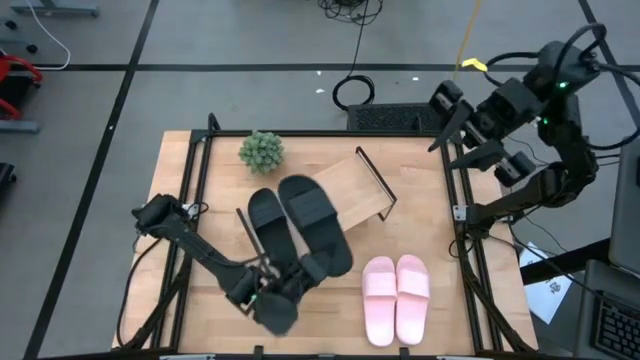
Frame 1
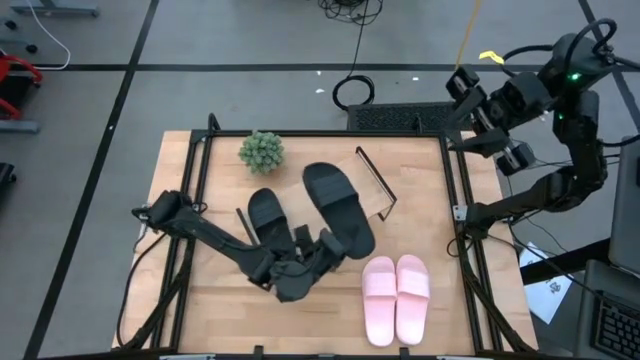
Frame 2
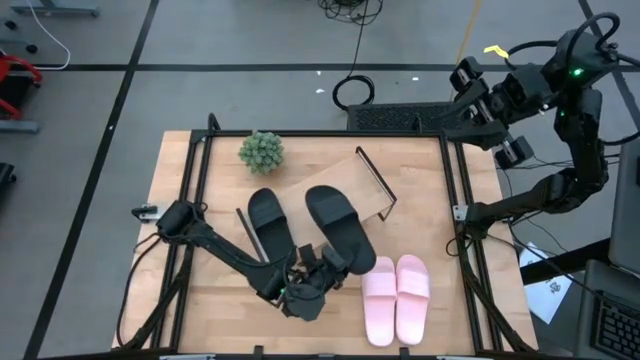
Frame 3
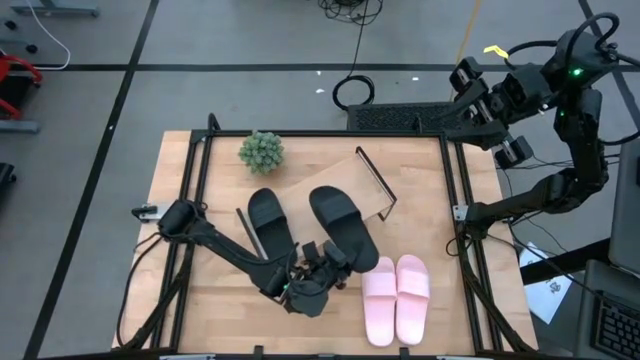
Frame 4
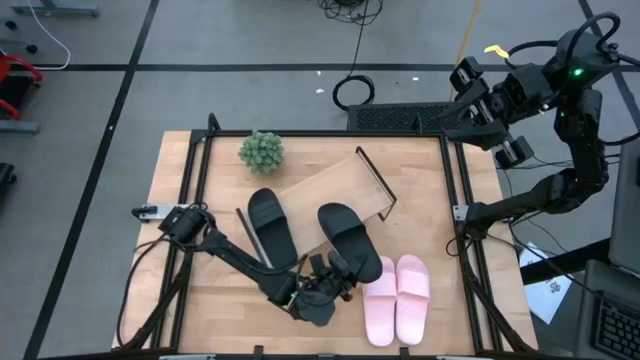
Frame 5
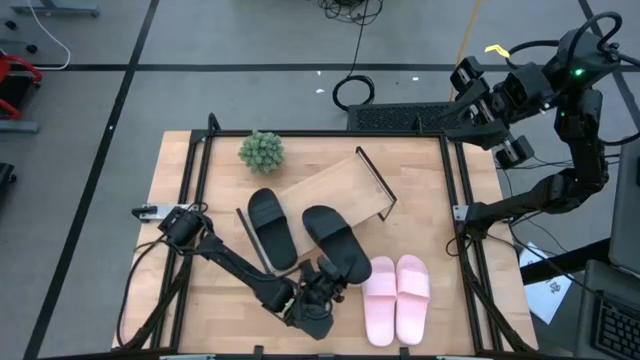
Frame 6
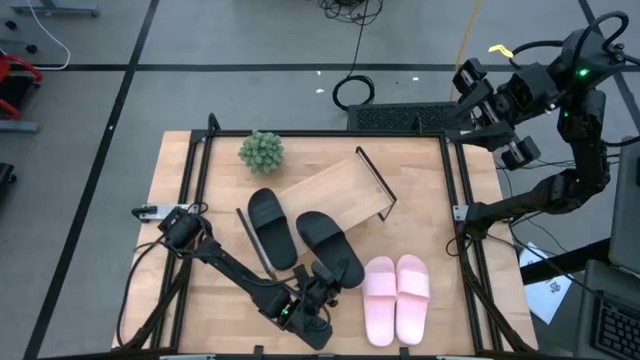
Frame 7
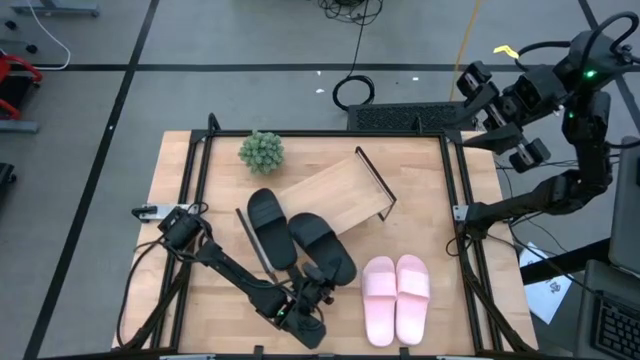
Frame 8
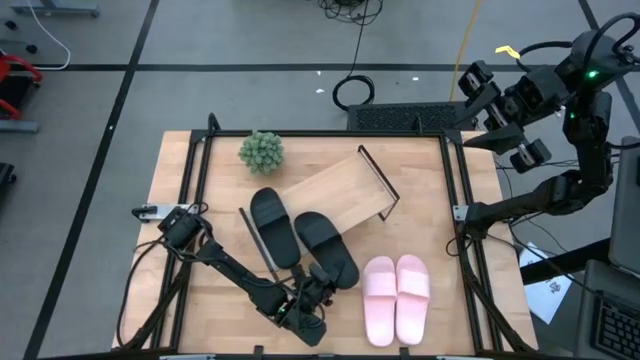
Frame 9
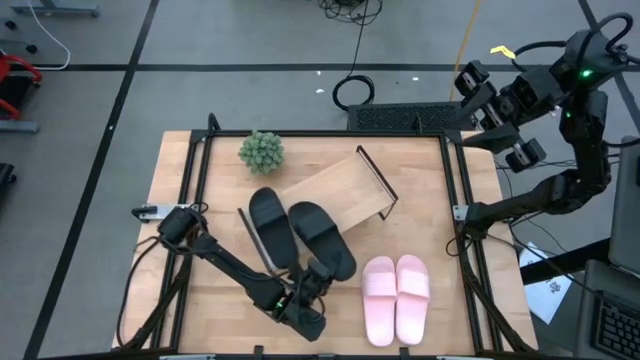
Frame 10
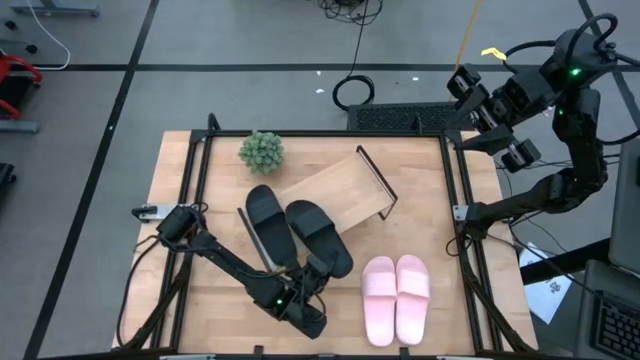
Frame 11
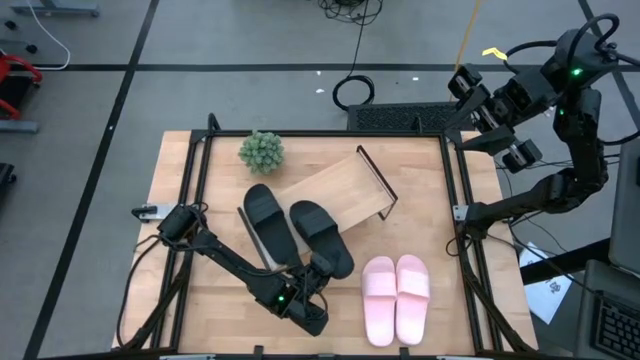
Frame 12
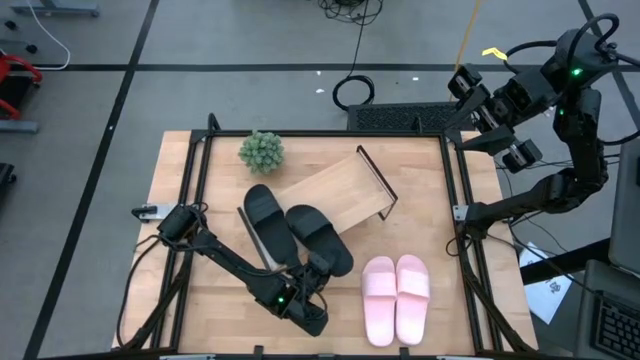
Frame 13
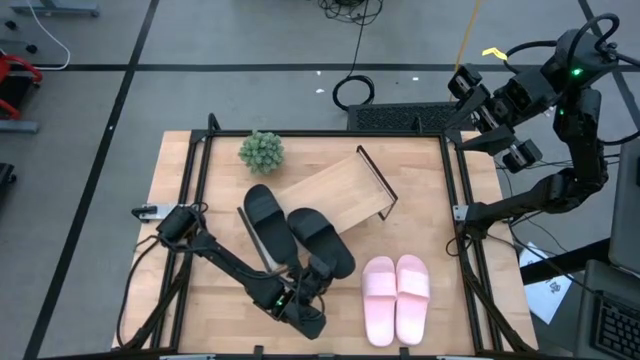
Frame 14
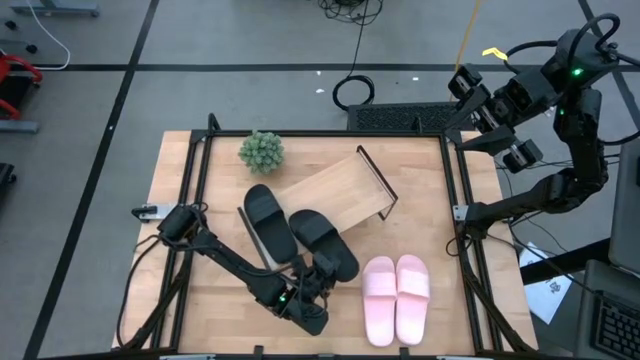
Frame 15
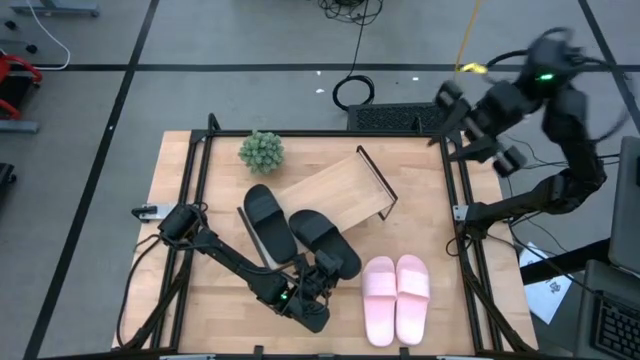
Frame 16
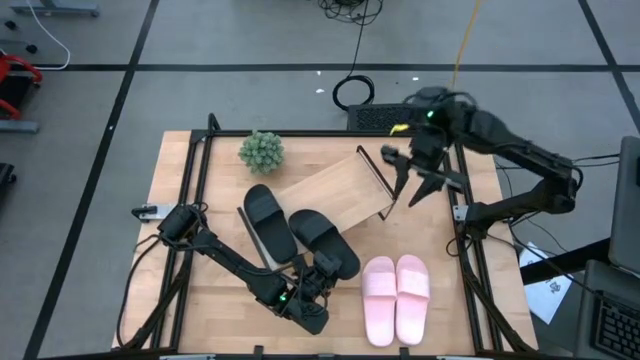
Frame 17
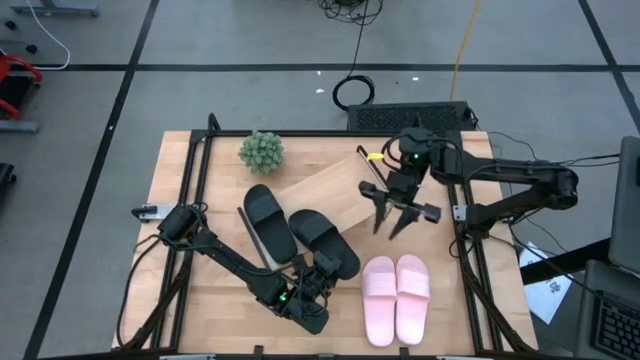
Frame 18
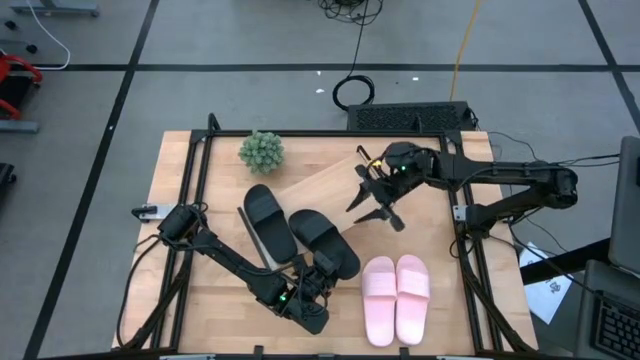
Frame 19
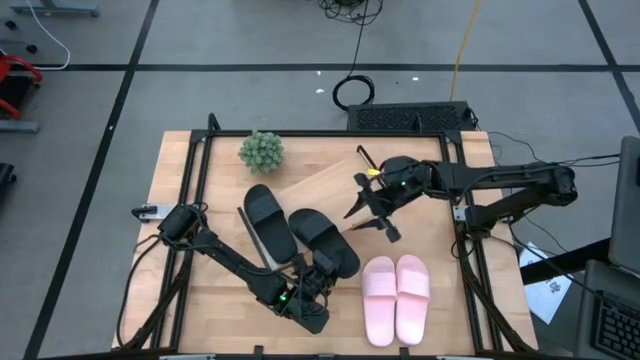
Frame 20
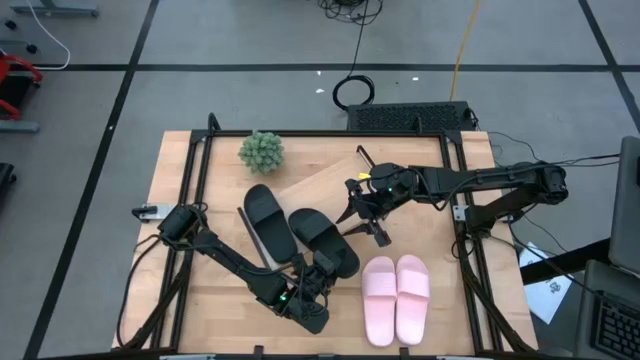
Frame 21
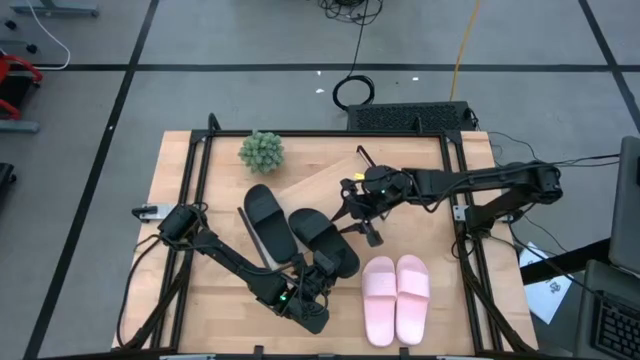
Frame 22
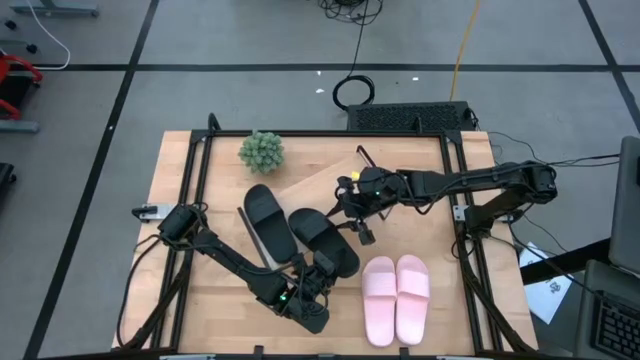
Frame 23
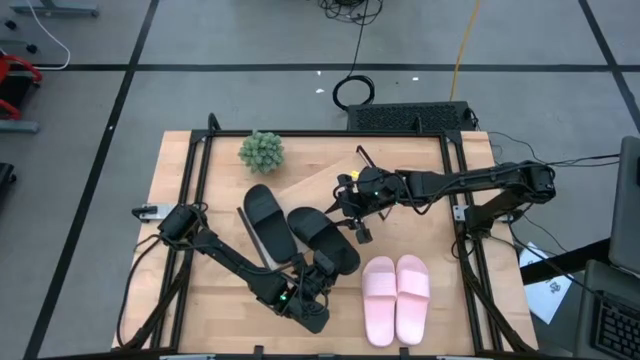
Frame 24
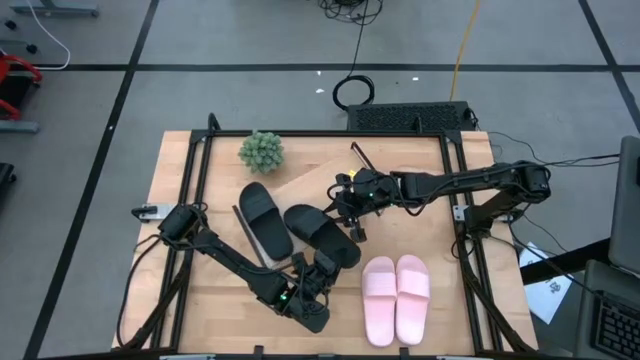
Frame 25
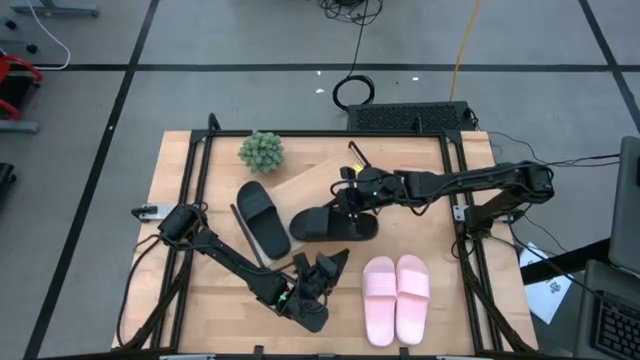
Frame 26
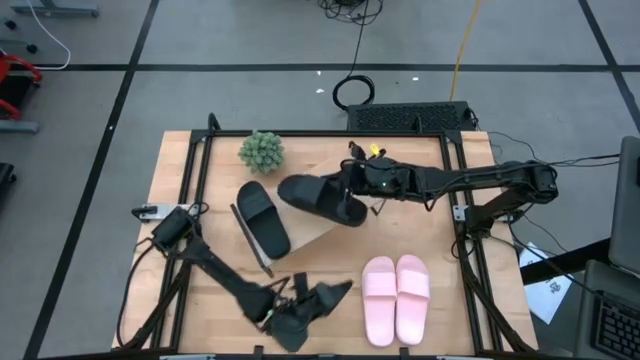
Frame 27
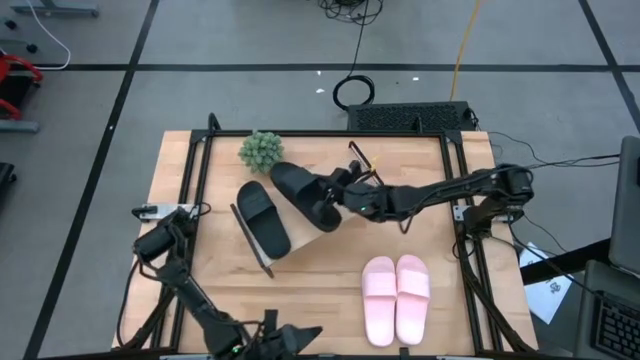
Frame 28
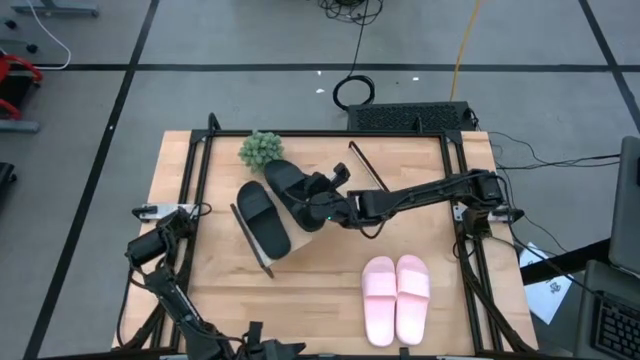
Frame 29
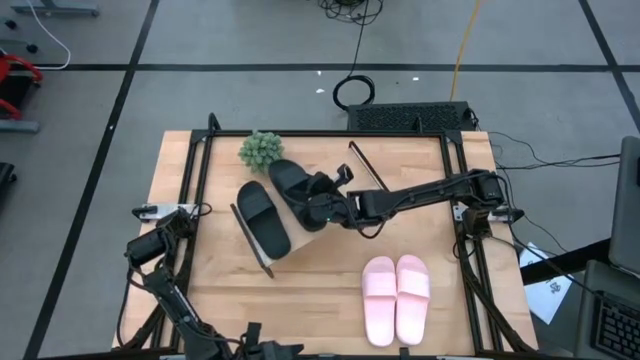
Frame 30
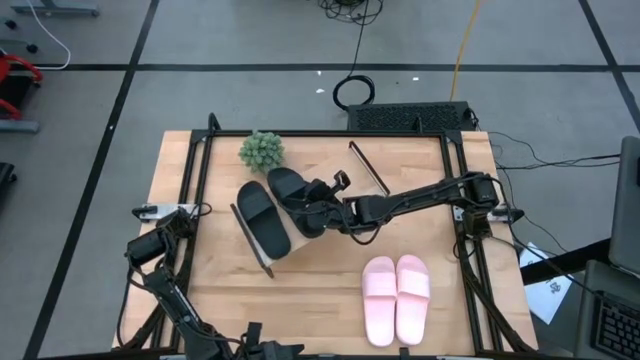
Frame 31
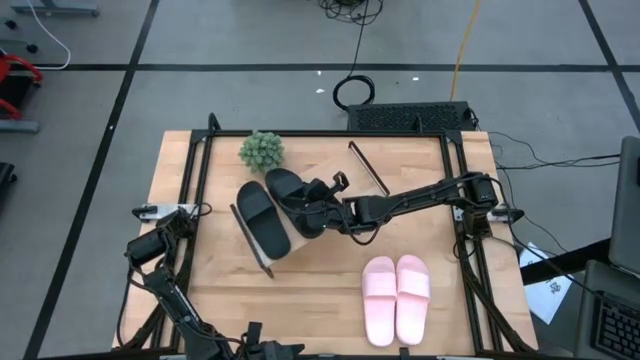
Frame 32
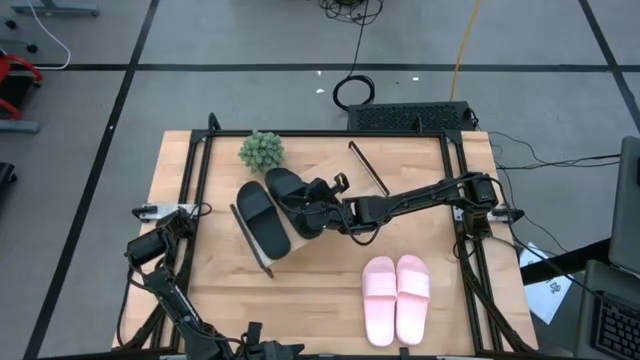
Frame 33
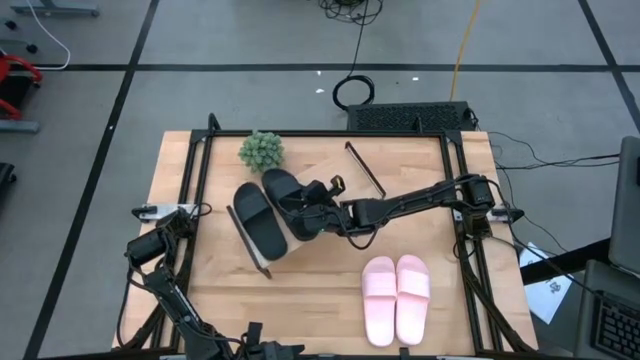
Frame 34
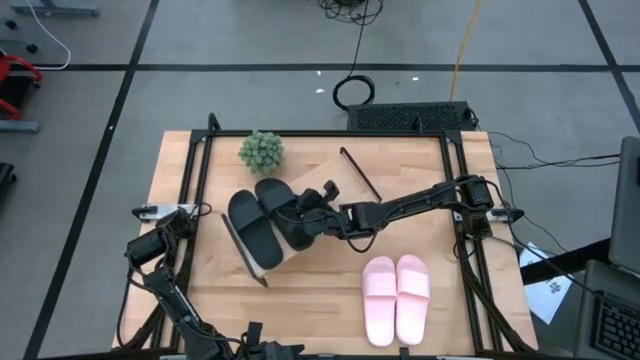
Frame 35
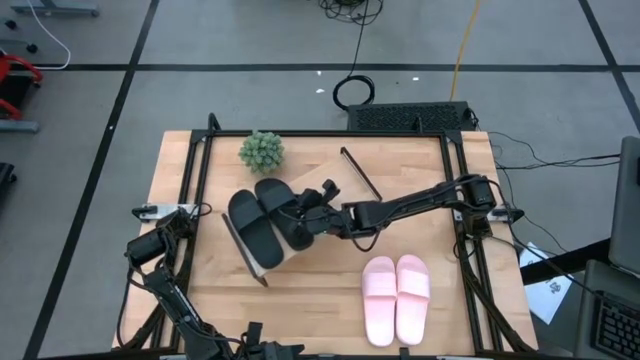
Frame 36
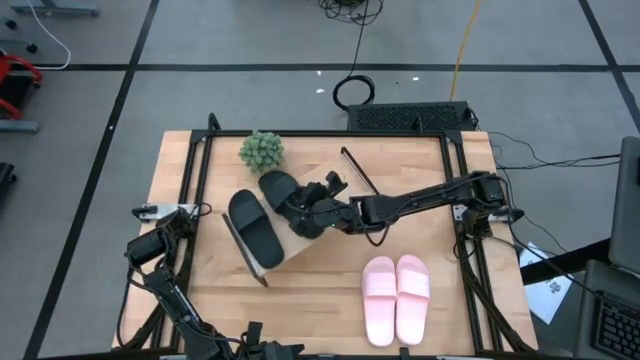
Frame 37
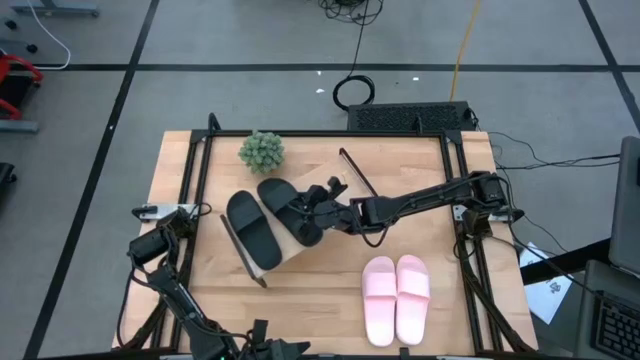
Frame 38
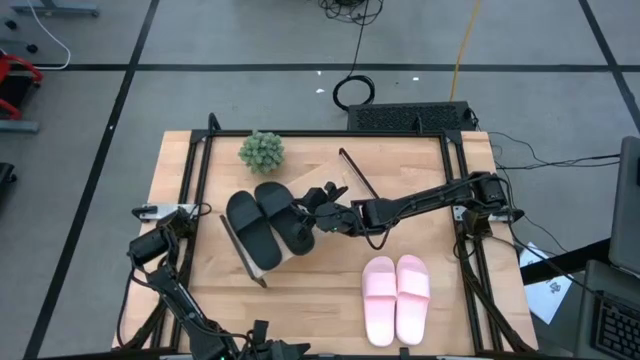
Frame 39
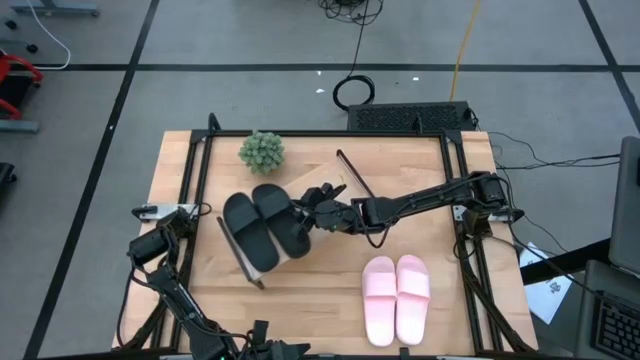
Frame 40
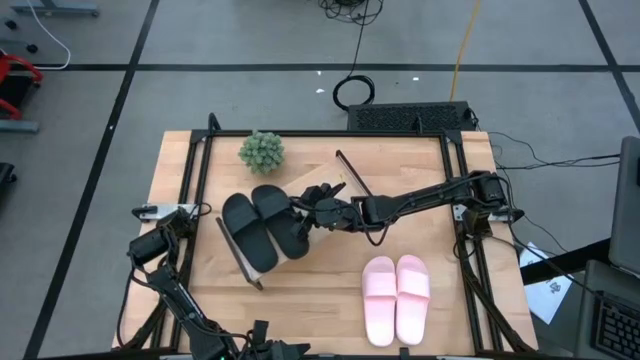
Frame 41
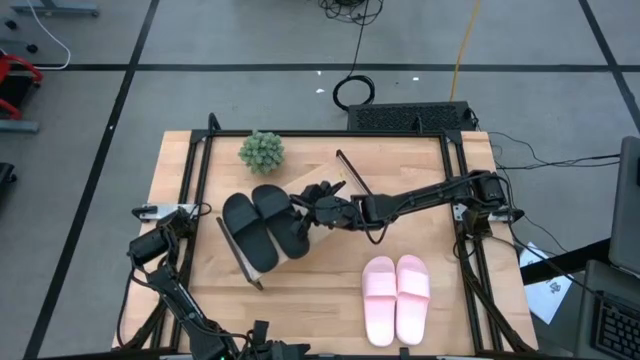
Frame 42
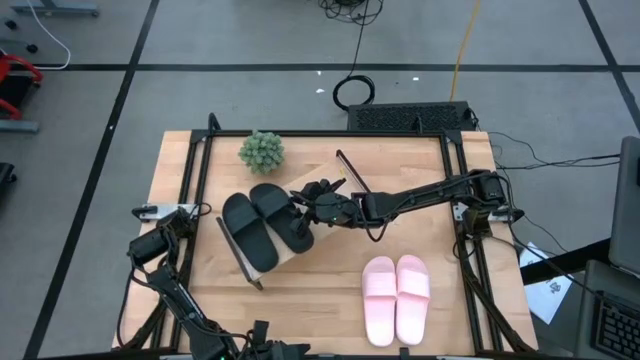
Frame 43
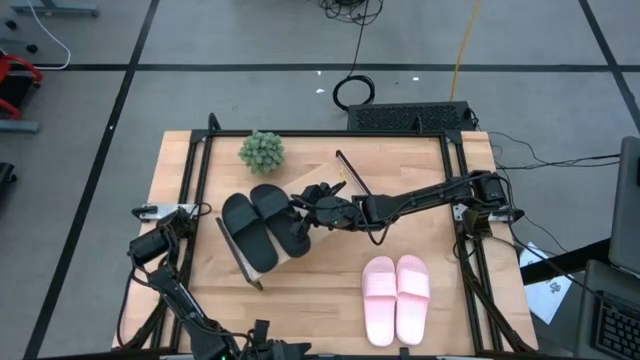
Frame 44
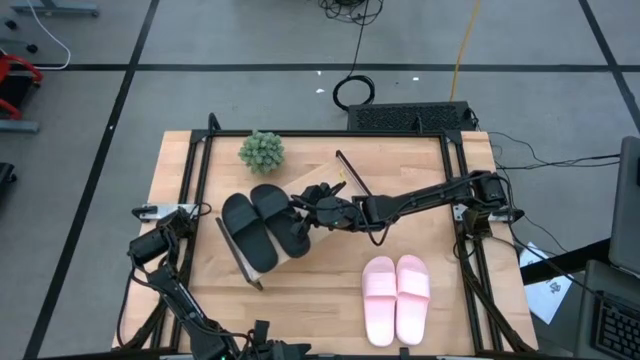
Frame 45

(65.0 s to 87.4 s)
Task: Pick and place slides into the shelf
Put the black slide on the shelf
